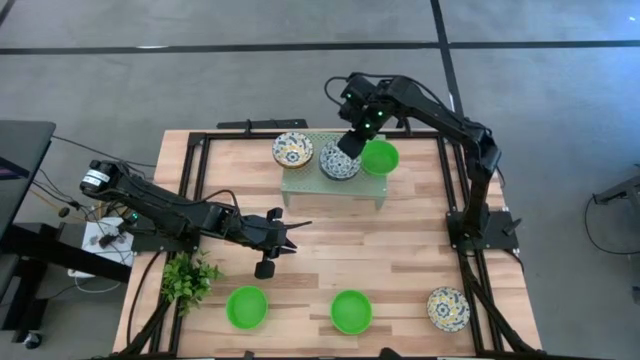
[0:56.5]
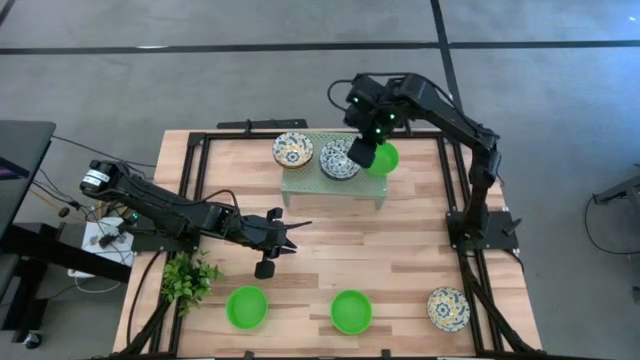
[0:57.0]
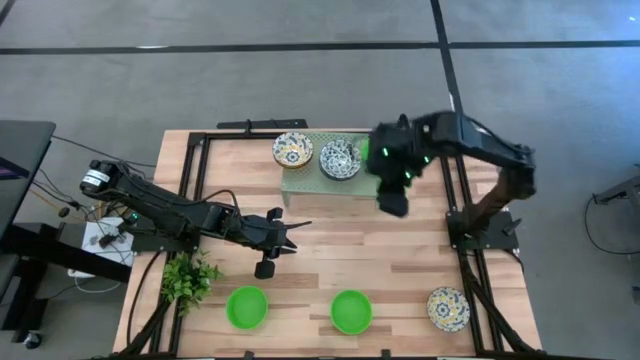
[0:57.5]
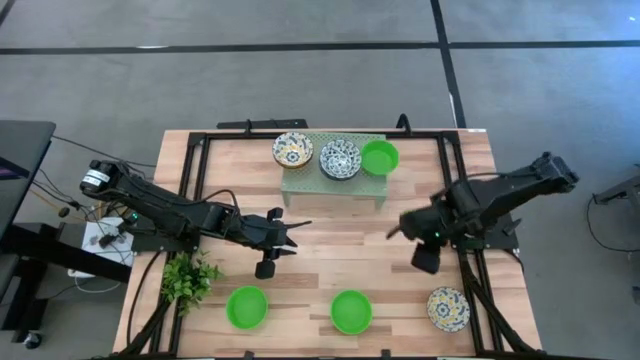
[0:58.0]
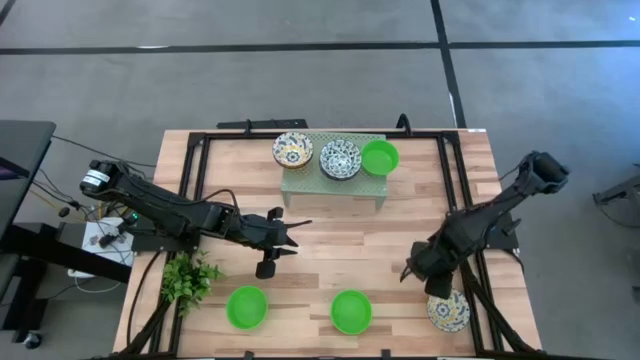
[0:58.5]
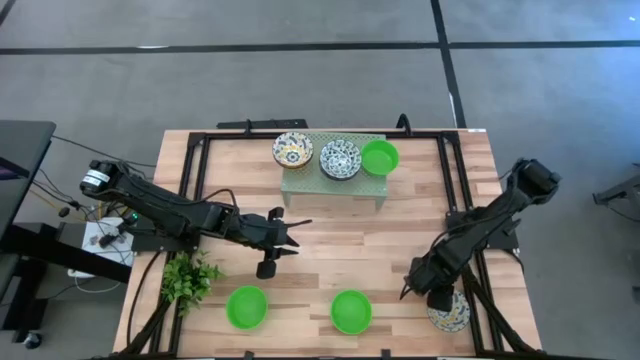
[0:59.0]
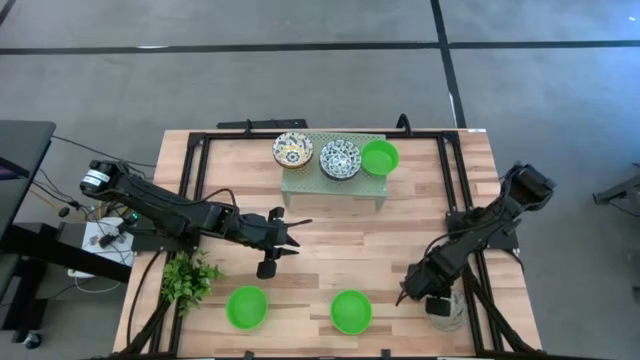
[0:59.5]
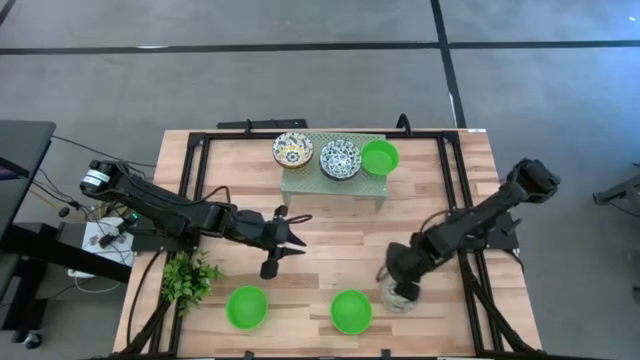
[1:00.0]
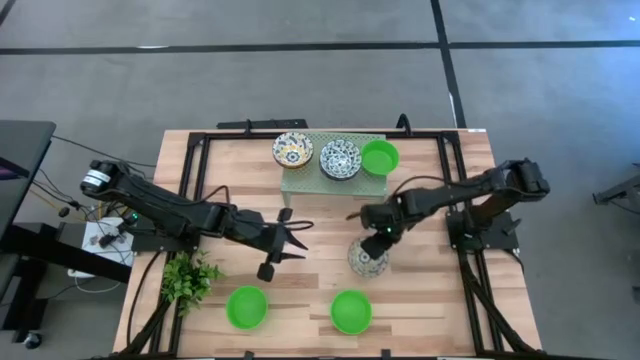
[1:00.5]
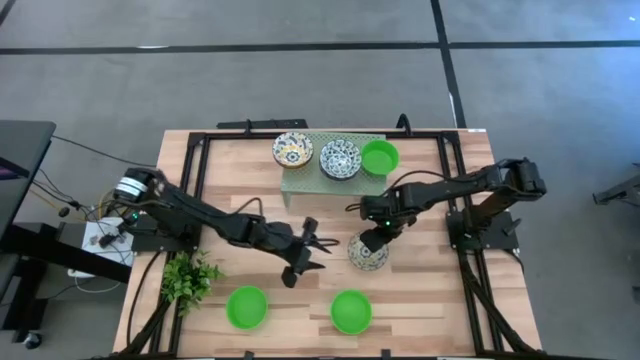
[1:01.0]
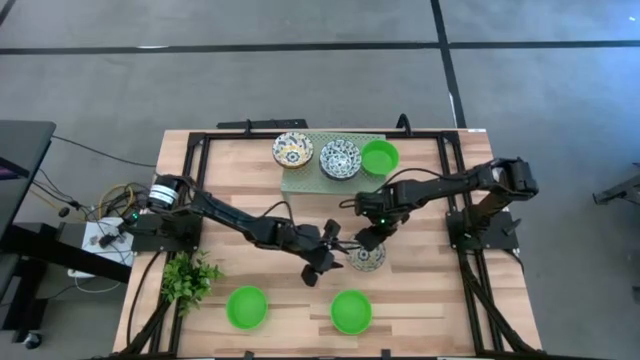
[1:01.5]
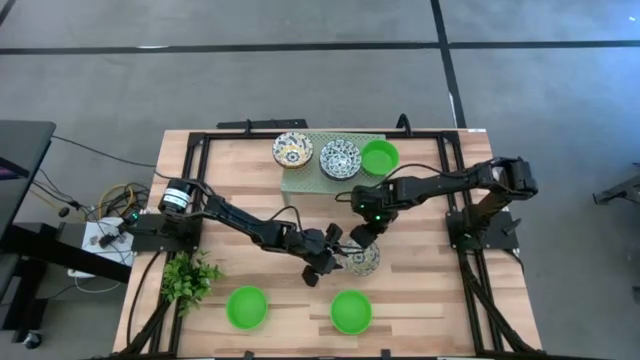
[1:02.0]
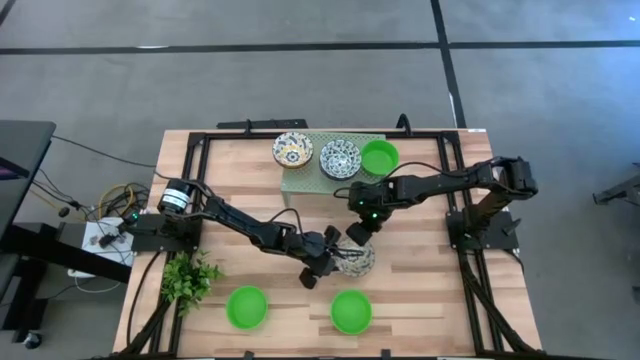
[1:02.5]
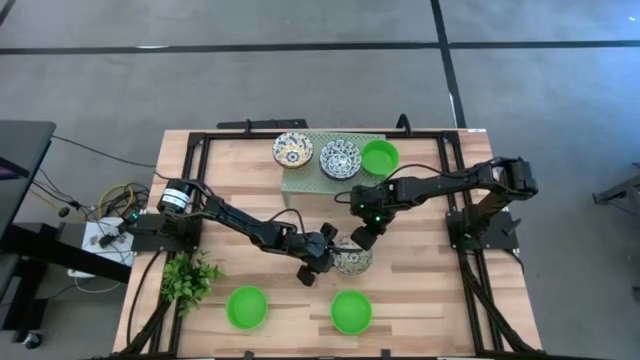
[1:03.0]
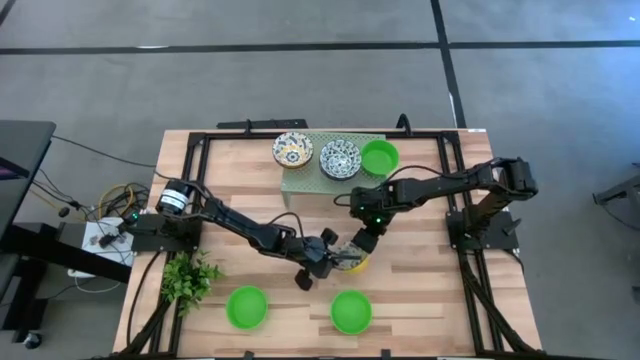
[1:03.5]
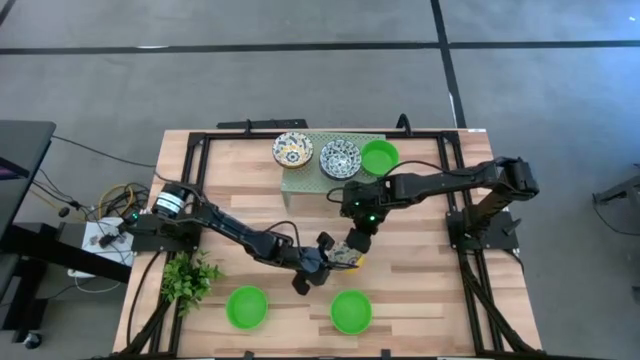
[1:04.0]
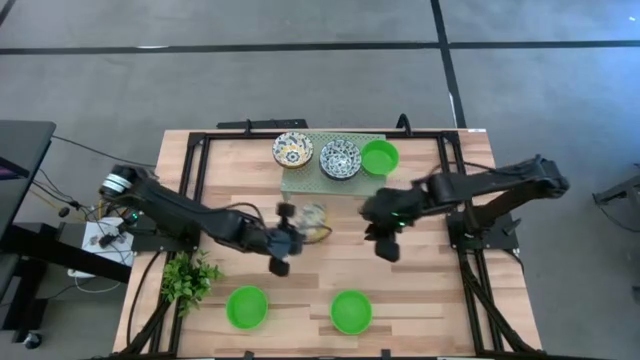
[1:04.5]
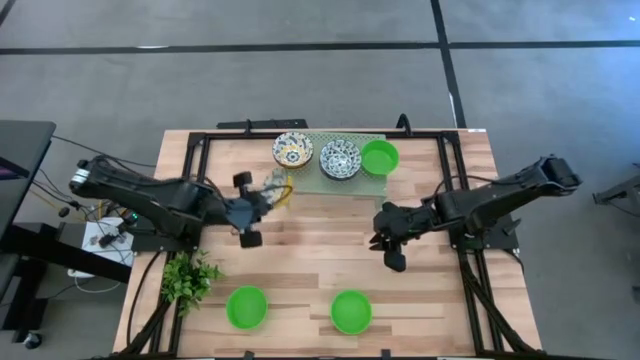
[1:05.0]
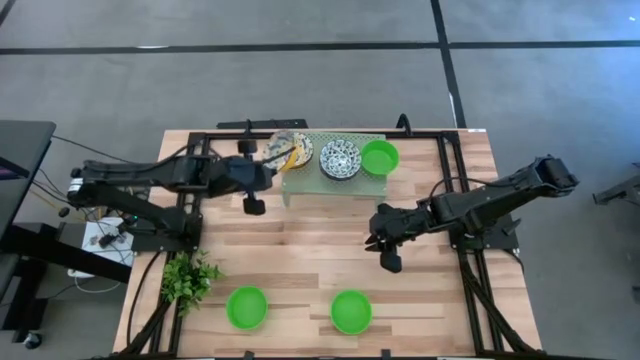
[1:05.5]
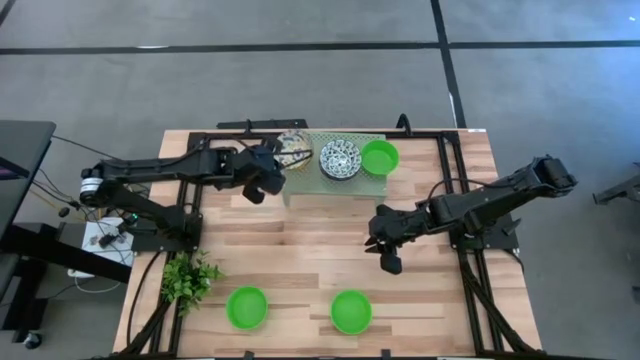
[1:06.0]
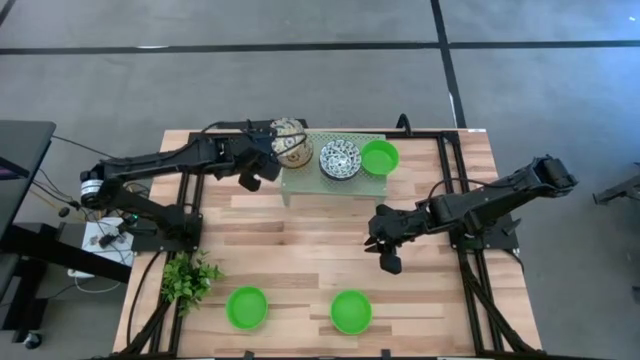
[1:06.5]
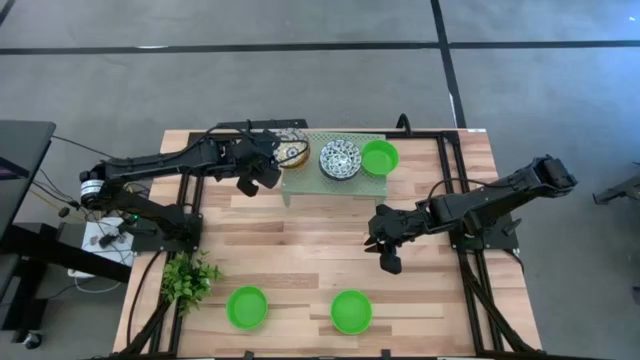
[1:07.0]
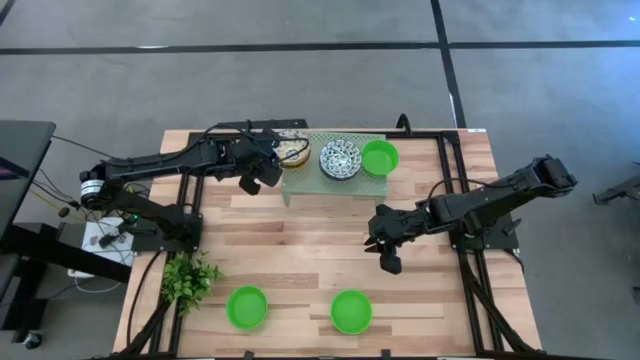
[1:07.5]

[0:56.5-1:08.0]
Task: Pick & Place Mini bowls
Stack the yellow patterned bowl on the stacked yellow patterned bowls on the shelf

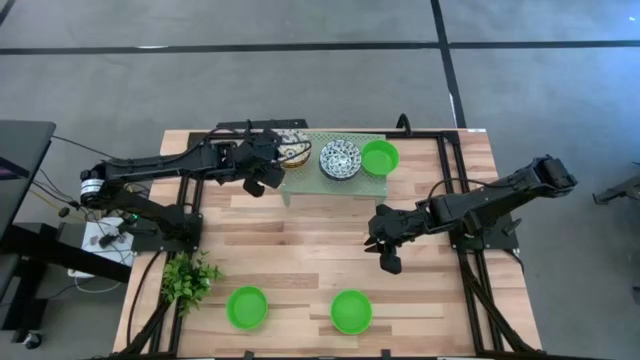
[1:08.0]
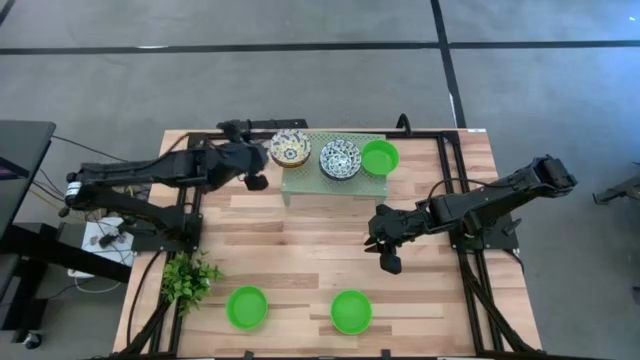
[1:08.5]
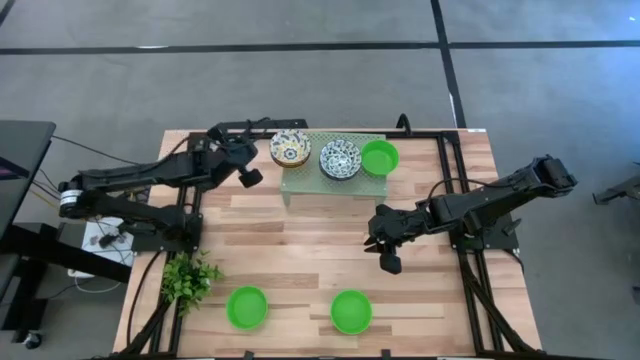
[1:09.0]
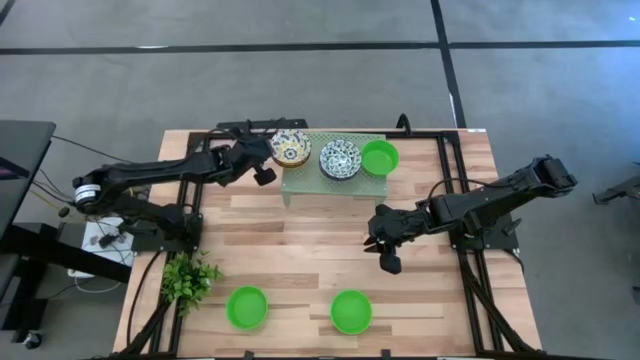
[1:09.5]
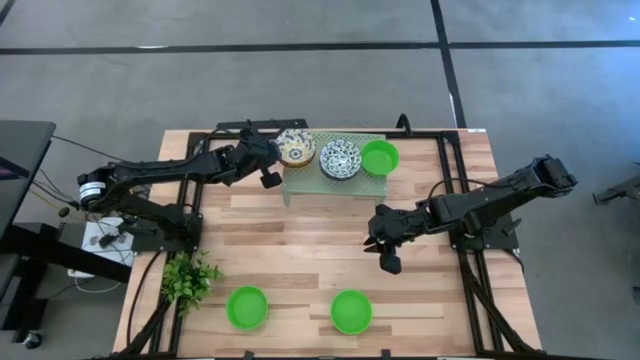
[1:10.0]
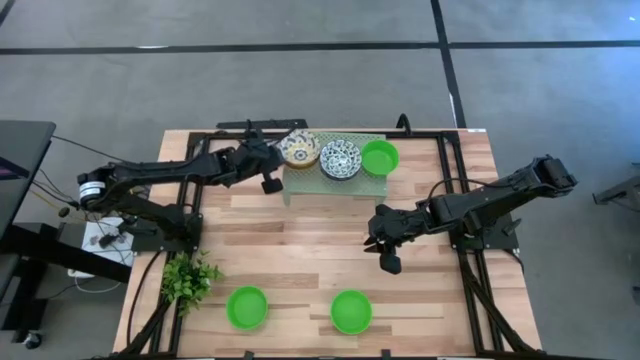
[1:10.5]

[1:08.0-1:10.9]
Adjust the stacked yellow bowls on the shelf

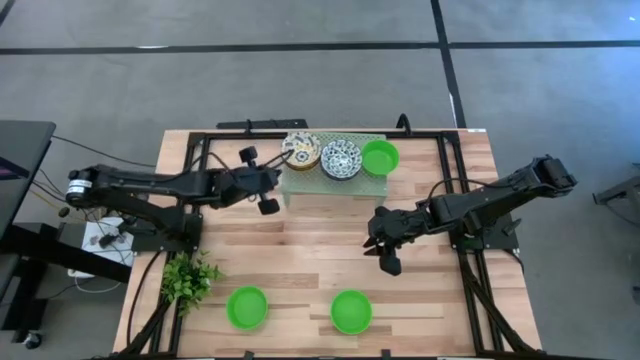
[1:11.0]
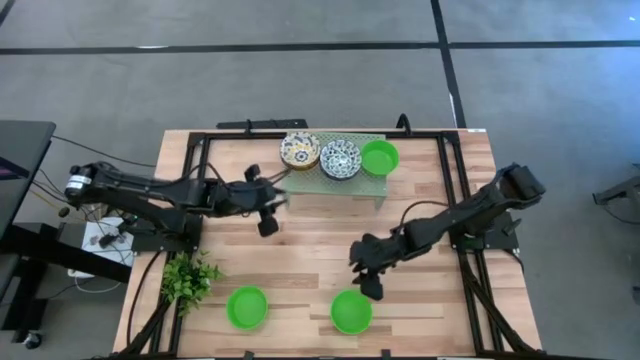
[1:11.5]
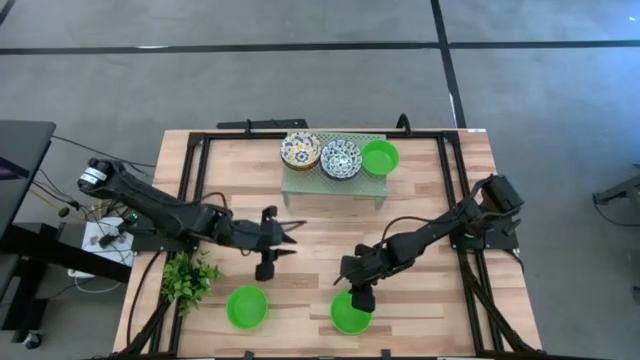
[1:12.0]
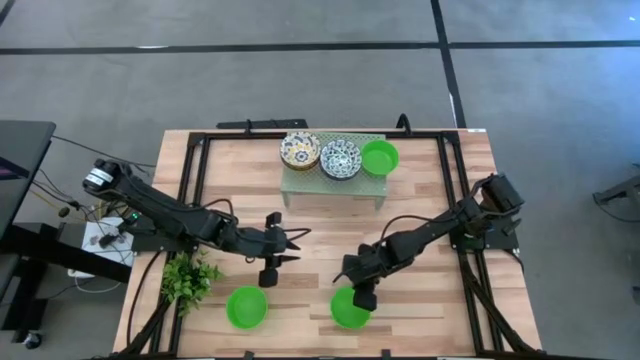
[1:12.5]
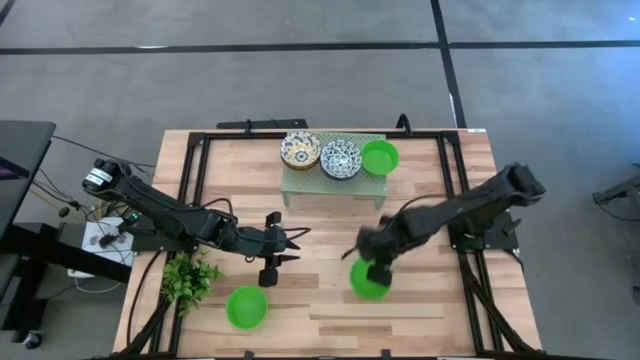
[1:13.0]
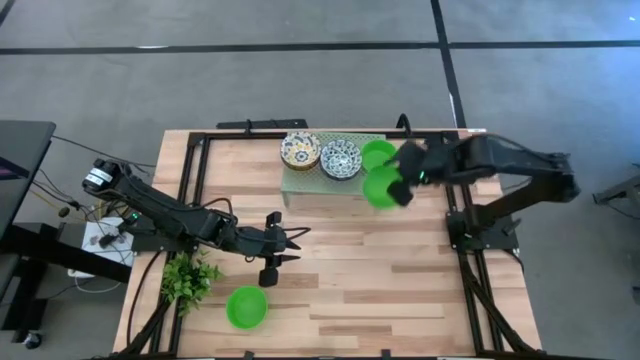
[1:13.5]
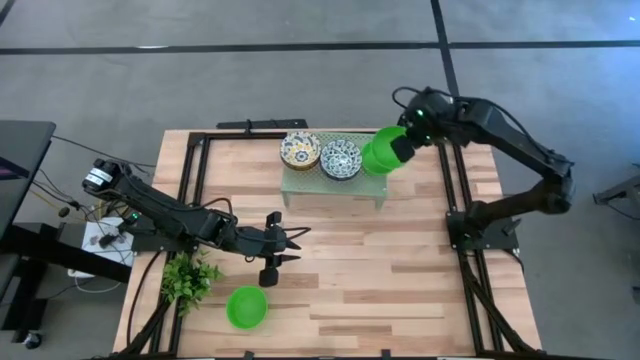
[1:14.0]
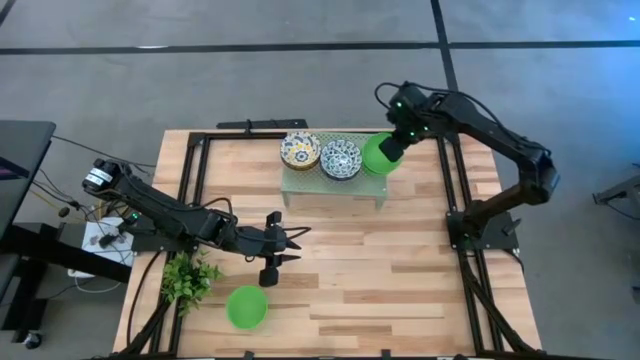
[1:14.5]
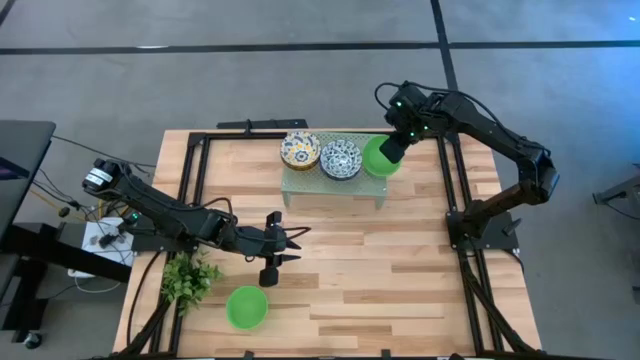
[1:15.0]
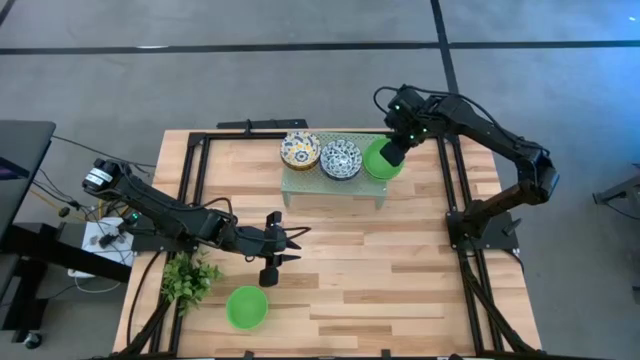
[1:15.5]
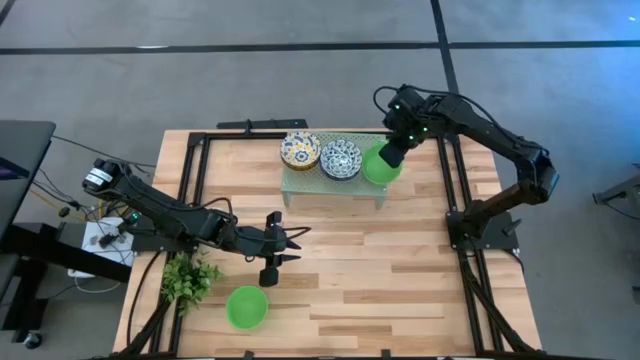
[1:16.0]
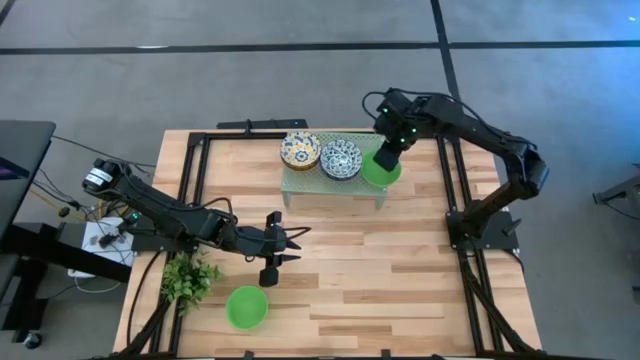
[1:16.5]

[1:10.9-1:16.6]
Stack the right green bowl on the green bowl on the shelf

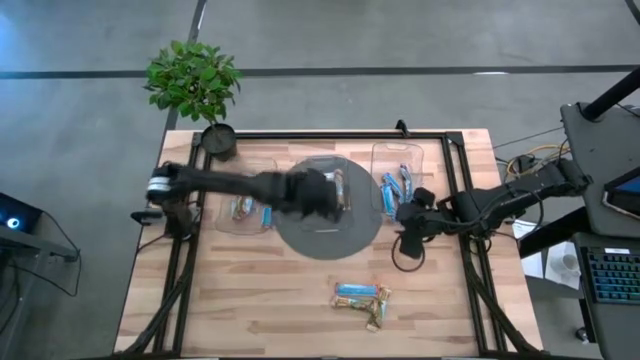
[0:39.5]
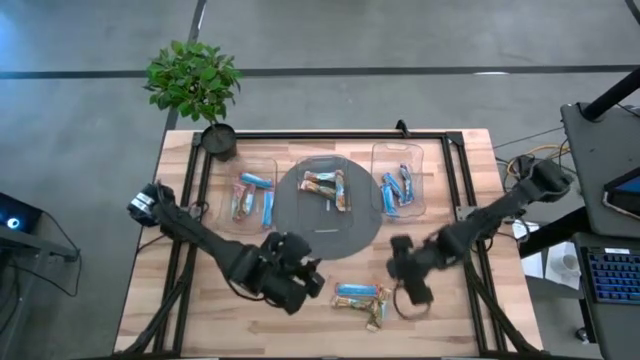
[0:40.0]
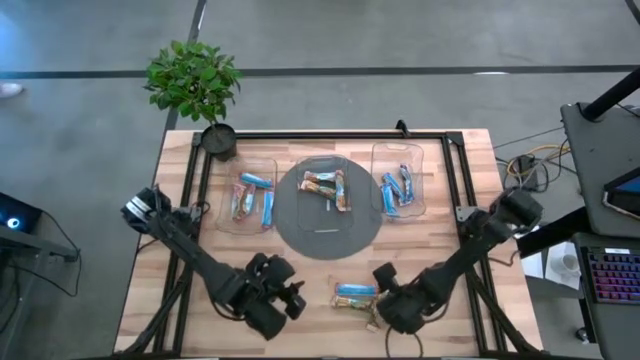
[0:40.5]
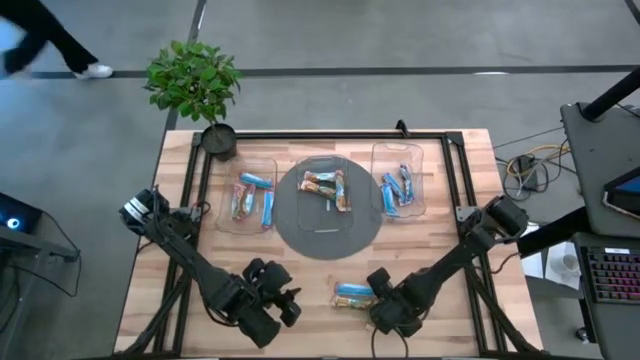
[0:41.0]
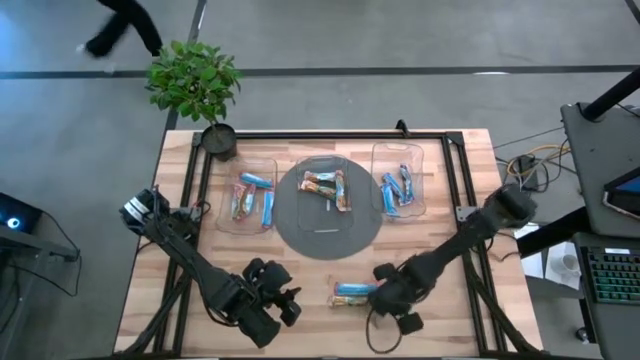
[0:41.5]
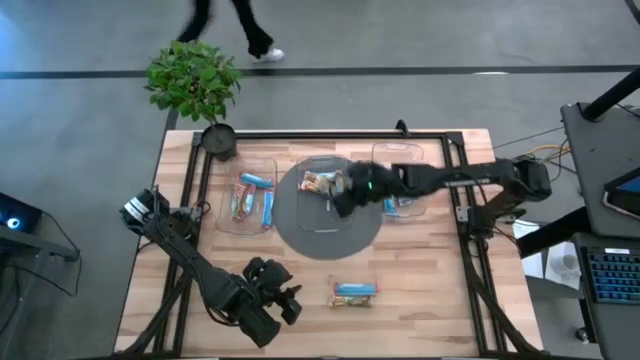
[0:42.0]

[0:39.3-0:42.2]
Task: Pick and place Granola Bars by type
Put the yellow granola bar into the middle transparent bin
